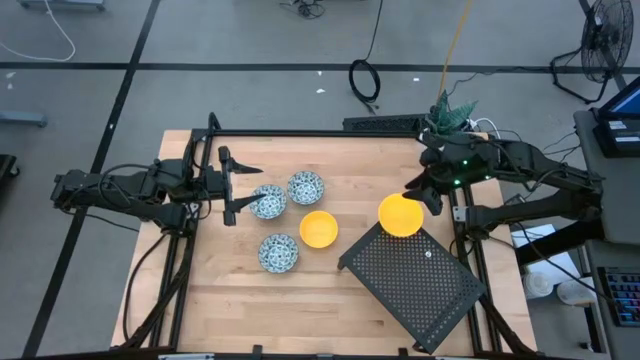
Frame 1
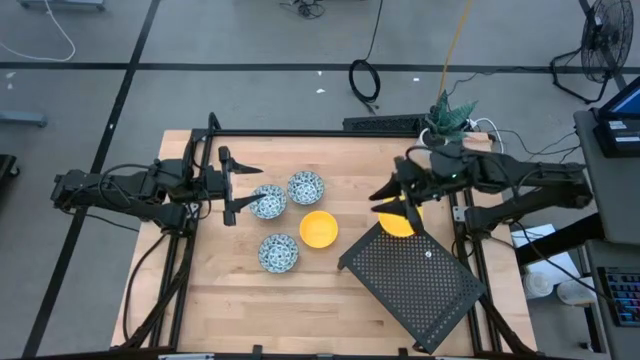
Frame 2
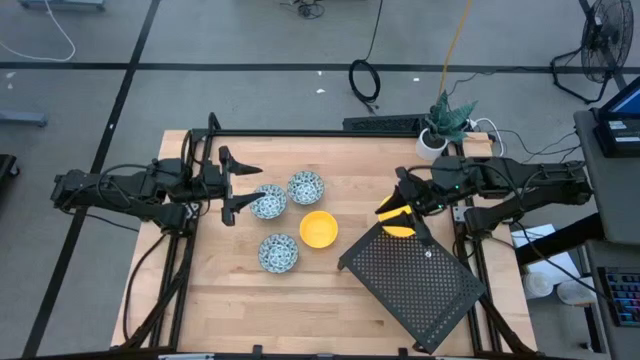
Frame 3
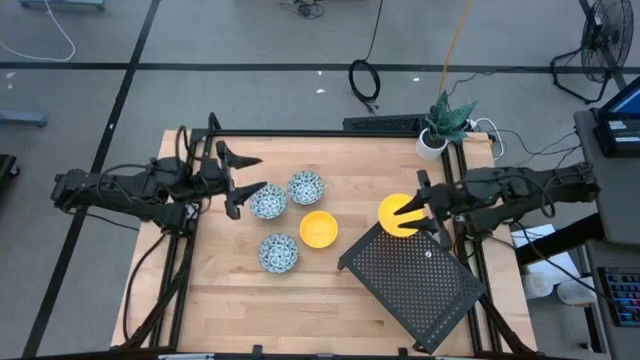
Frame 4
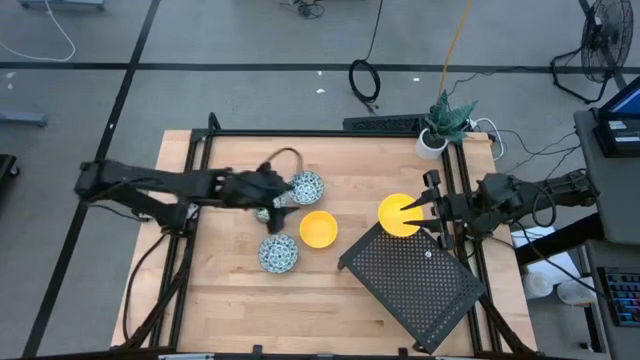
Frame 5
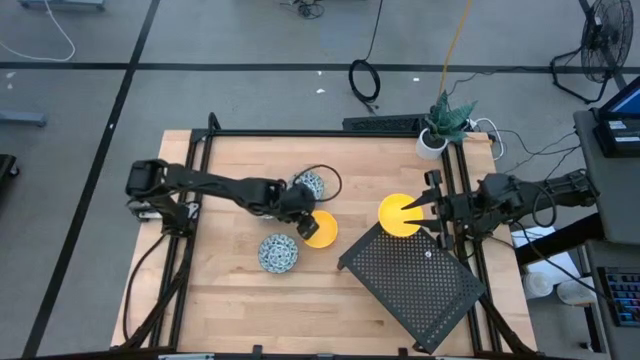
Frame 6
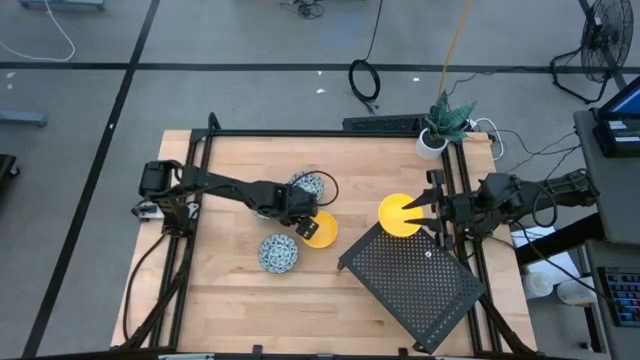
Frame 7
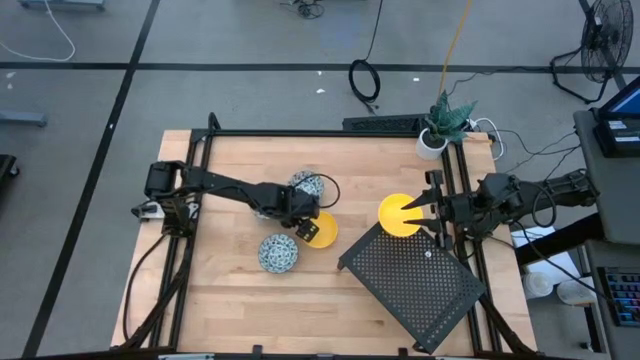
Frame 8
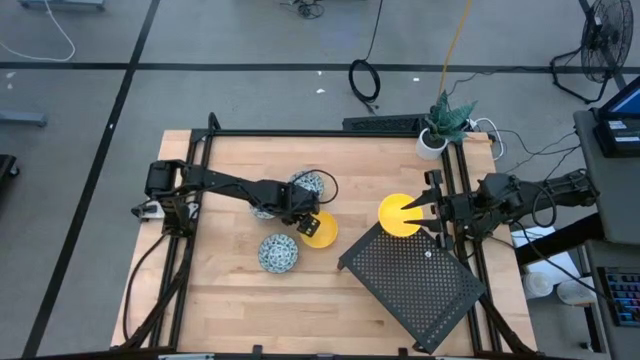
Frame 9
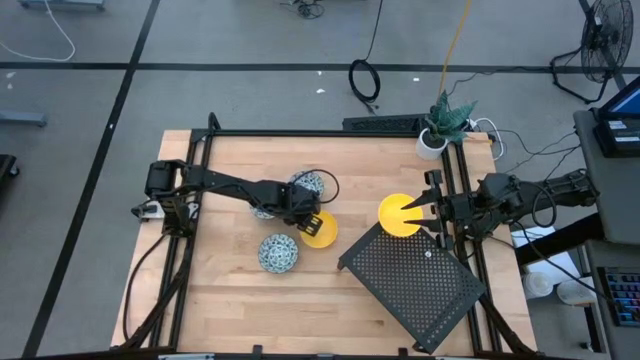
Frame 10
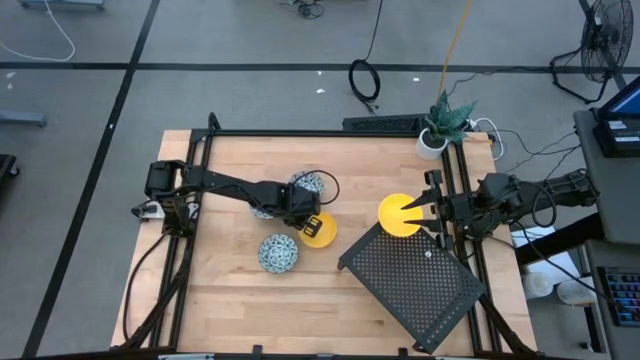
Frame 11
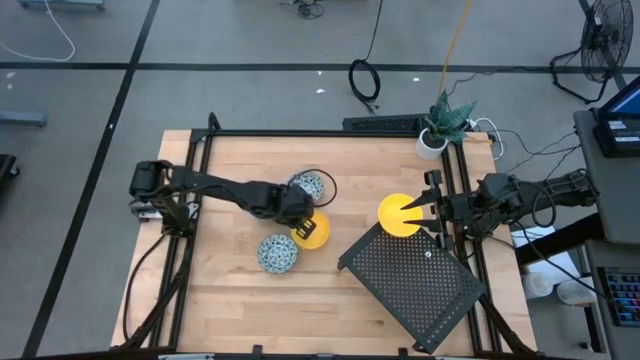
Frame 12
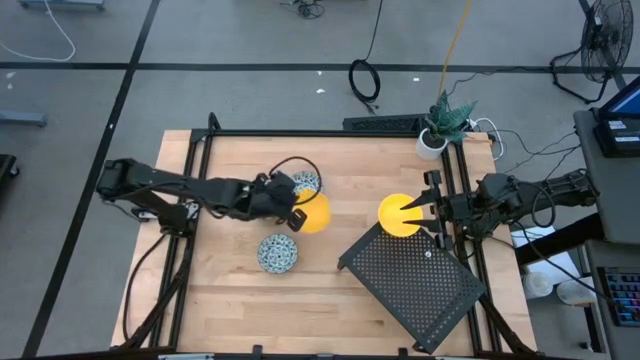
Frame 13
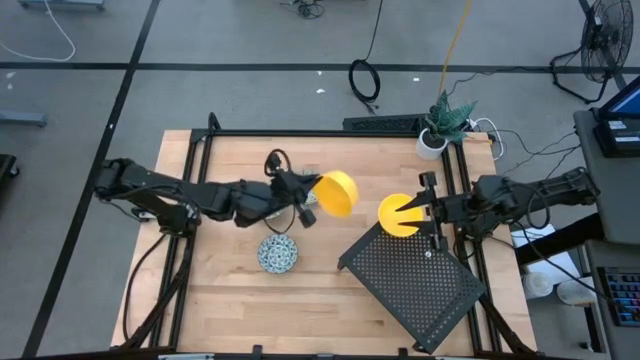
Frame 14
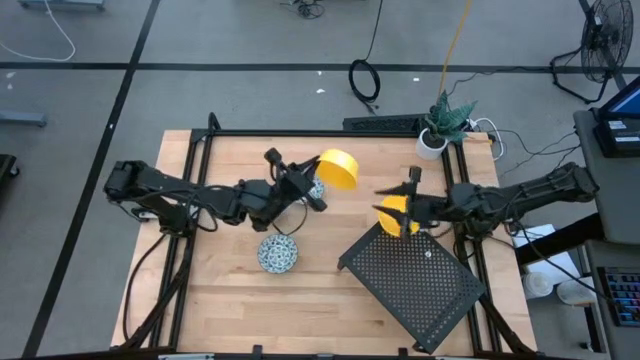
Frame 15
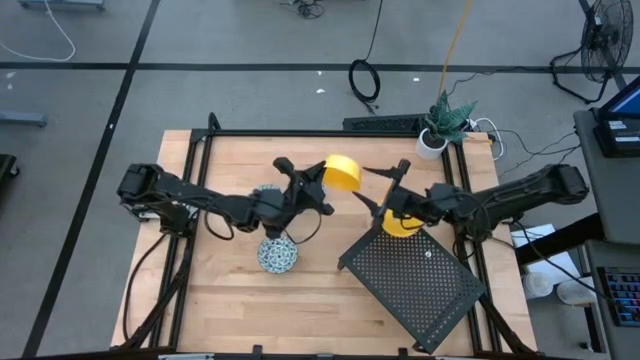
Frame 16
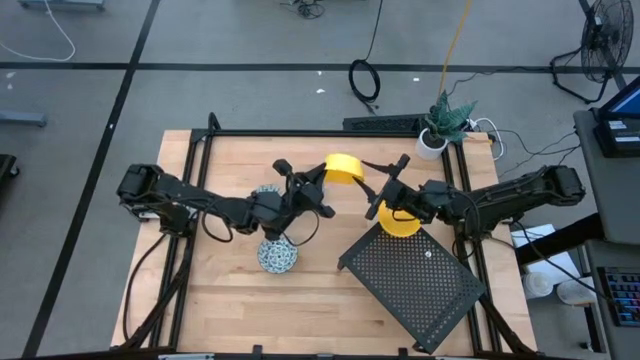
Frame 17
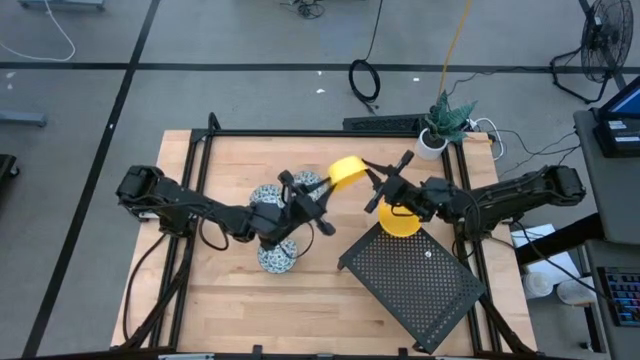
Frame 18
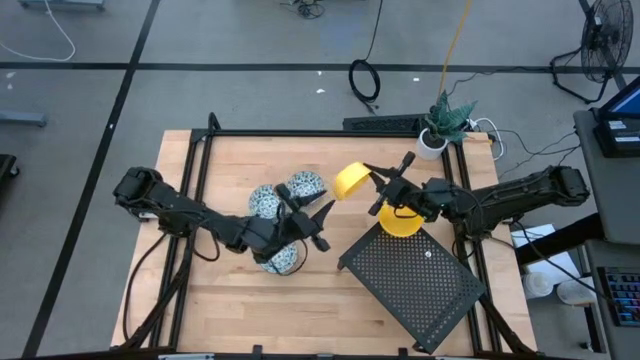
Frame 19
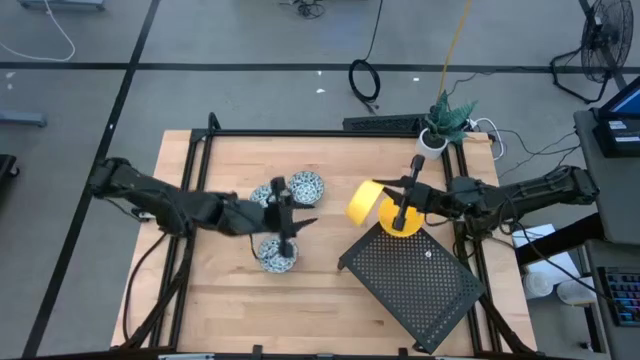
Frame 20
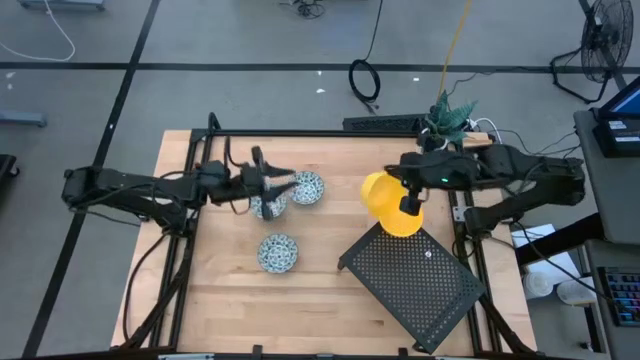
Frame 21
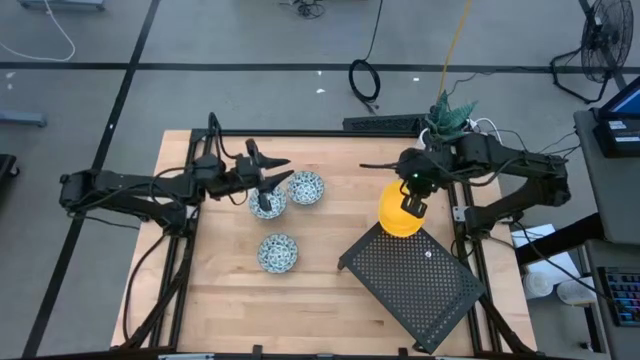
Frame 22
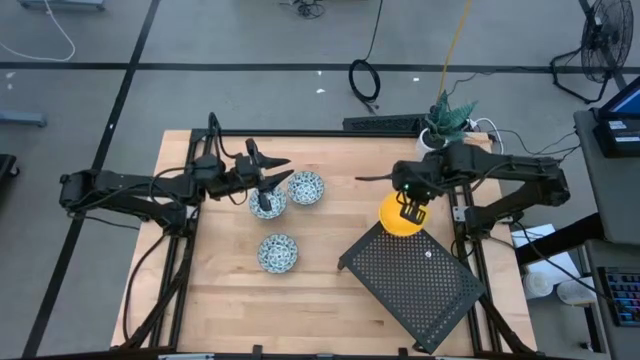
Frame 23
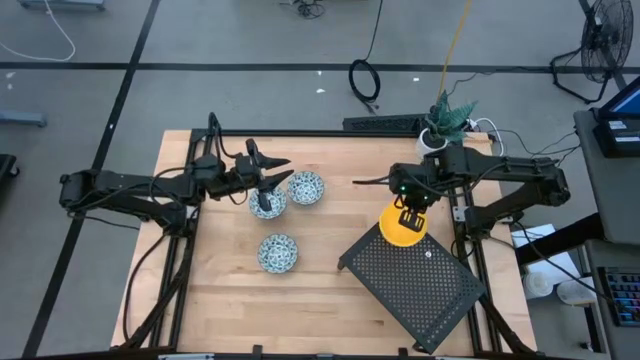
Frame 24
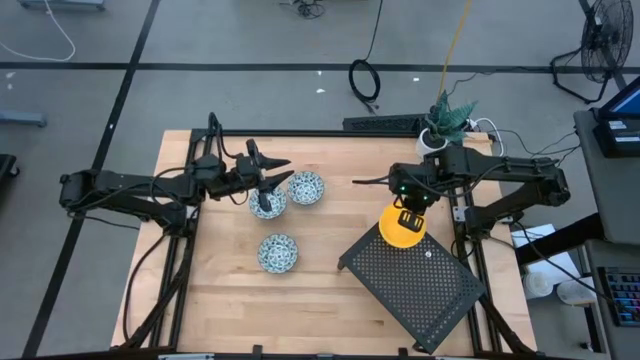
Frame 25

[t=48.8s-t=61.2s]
Task: Pick & Place Mini bowls
Stack the yellow bowl on top of the yellow bowls on the shelf

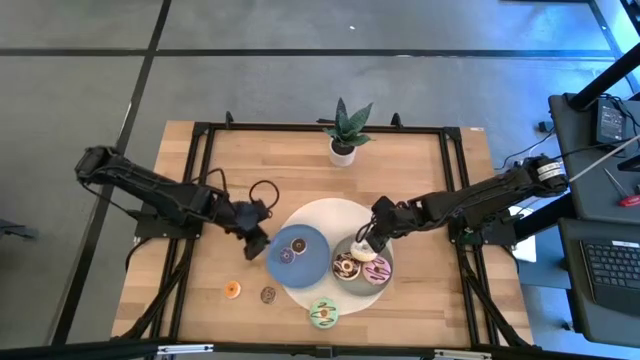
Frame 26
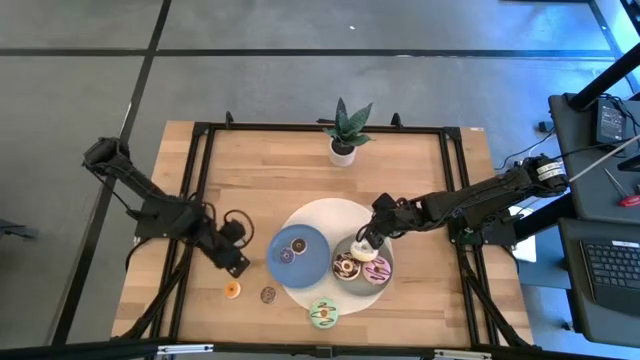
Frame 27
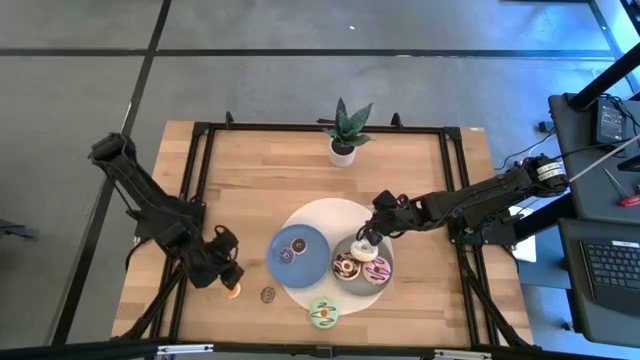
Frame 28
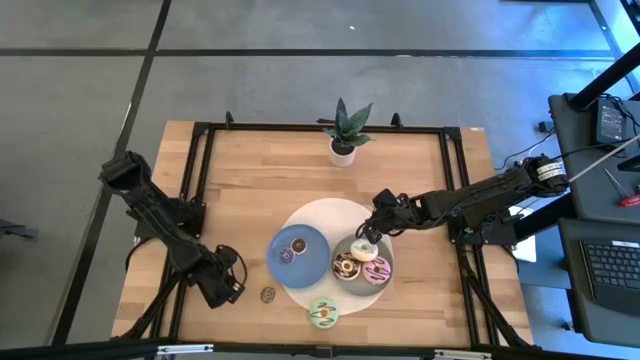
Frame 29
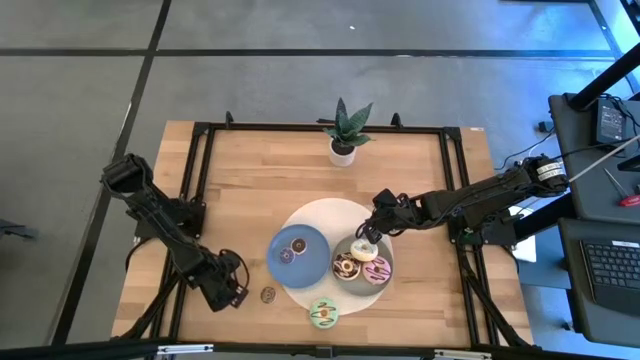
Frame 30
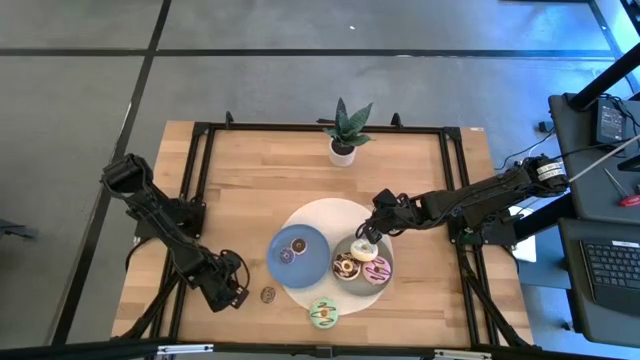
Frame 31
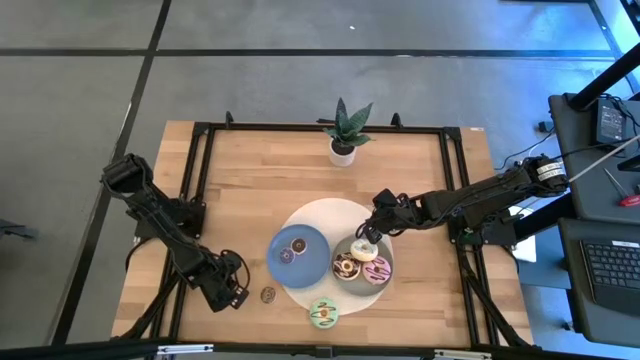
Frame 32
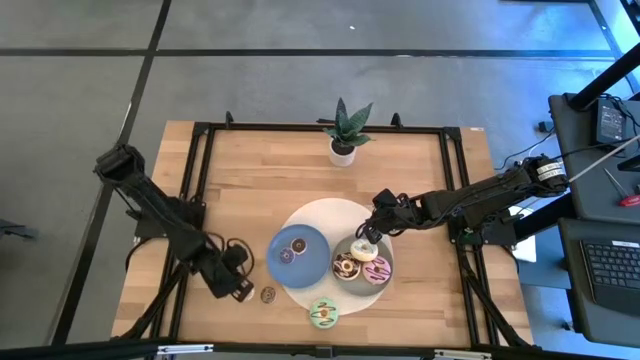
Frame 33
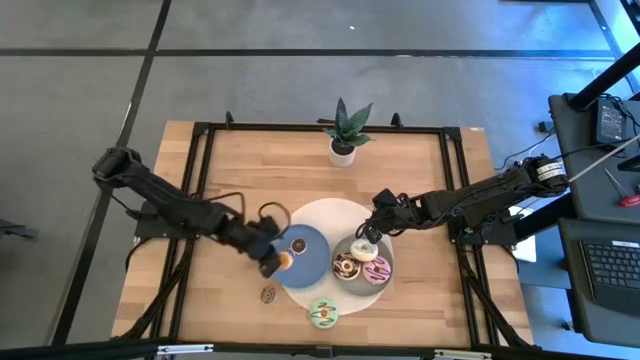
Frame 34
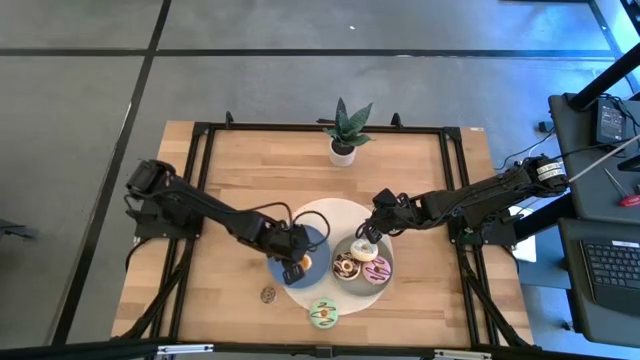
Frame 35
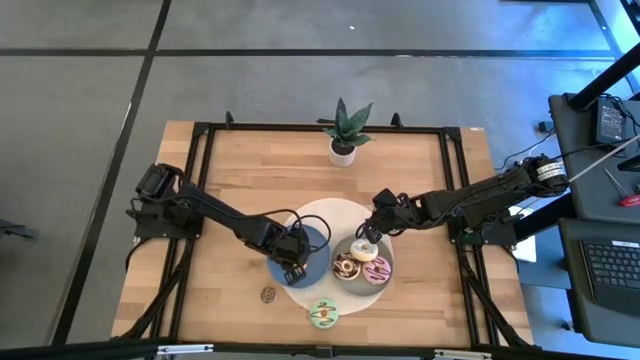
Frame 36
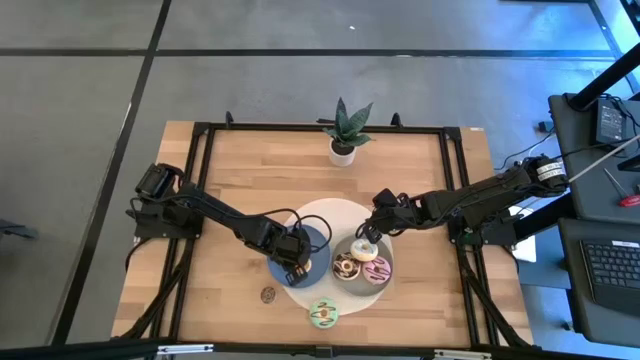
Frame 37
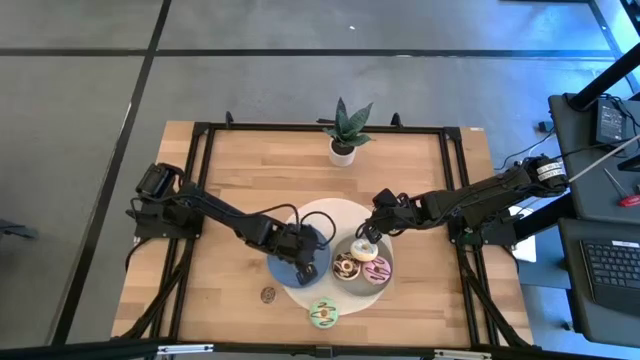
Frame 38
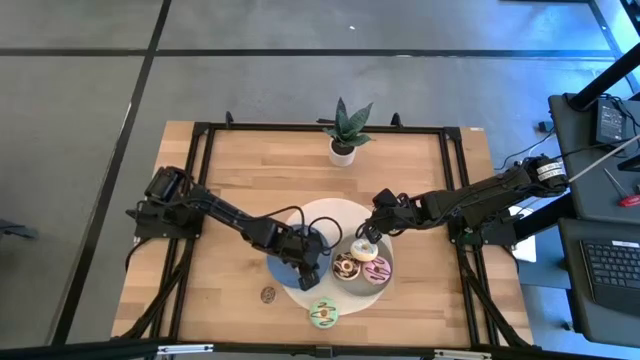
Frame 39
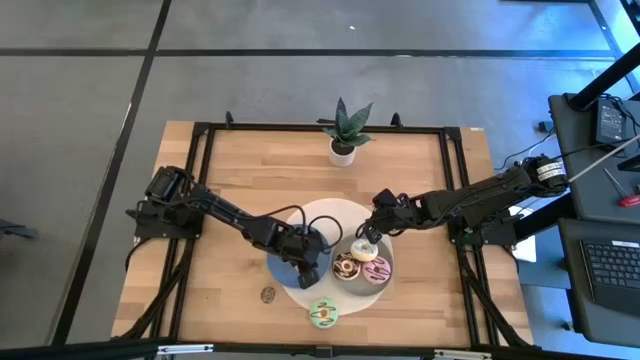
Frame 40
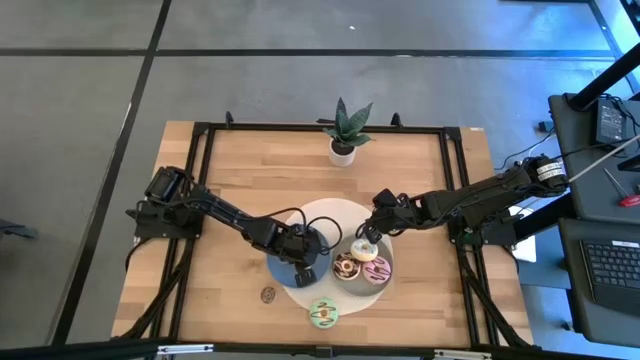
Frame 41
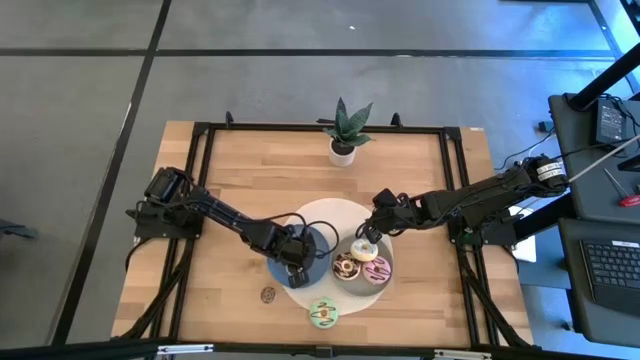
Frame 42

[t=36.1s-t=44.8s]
Task: Pick & Place donuts
Put the small yellow donut on the blue plate
